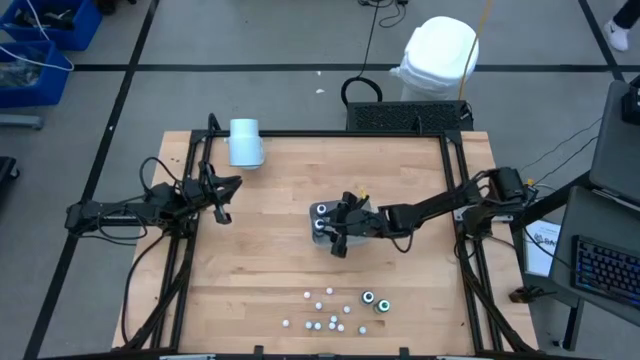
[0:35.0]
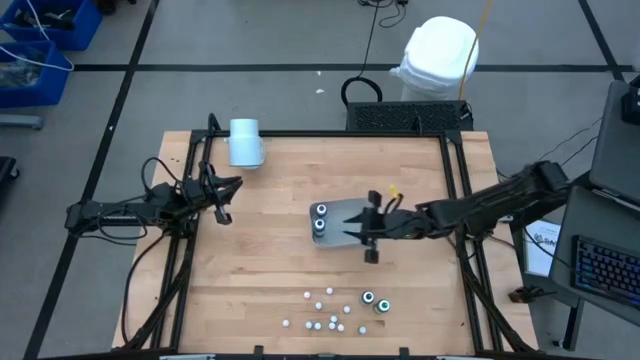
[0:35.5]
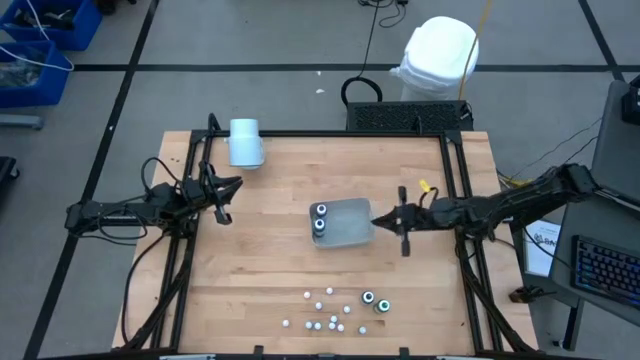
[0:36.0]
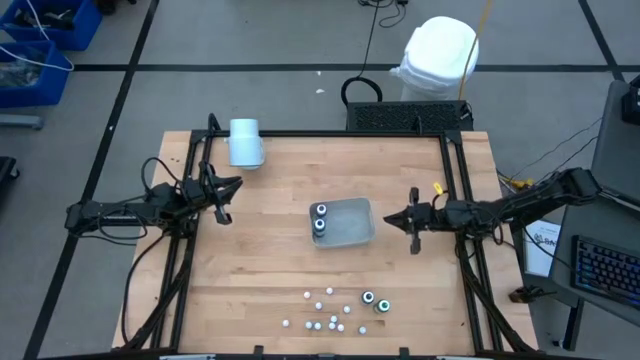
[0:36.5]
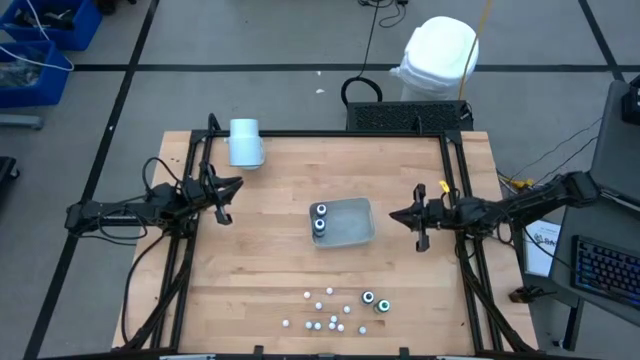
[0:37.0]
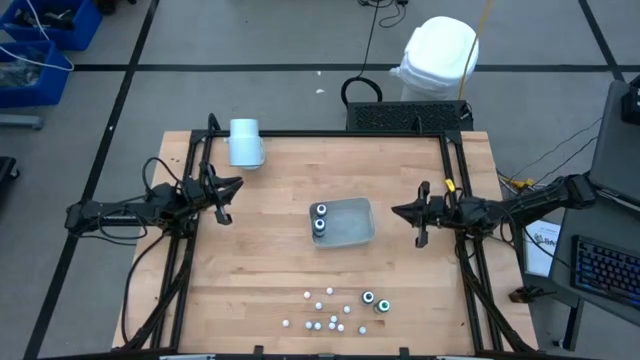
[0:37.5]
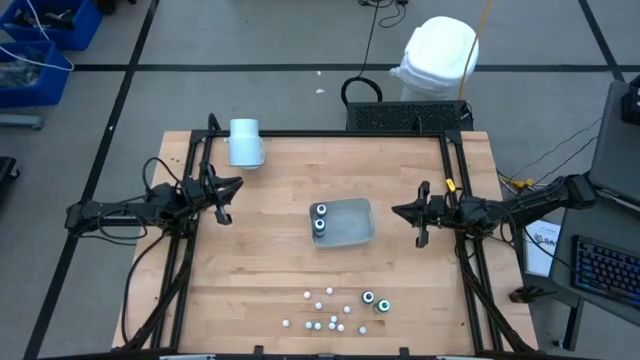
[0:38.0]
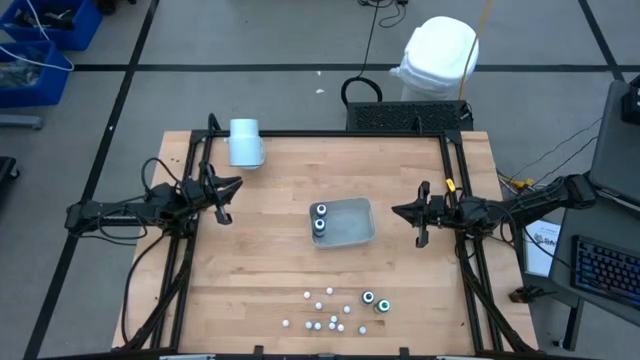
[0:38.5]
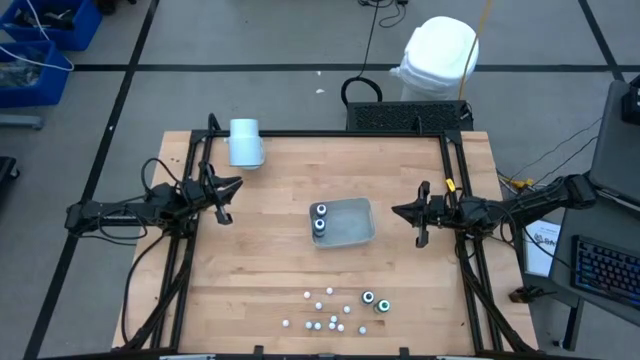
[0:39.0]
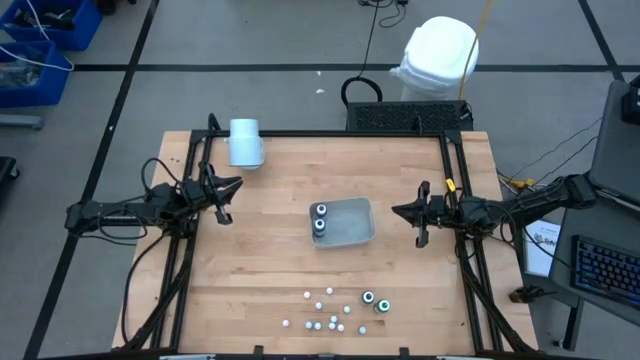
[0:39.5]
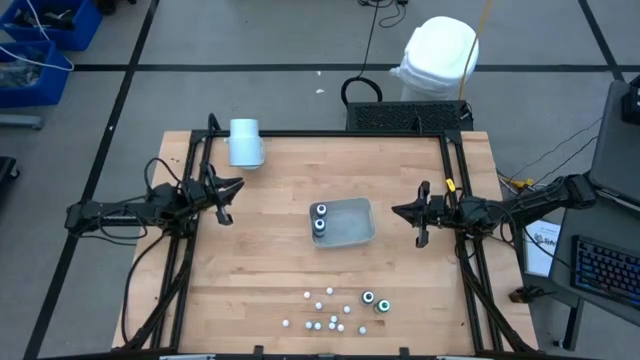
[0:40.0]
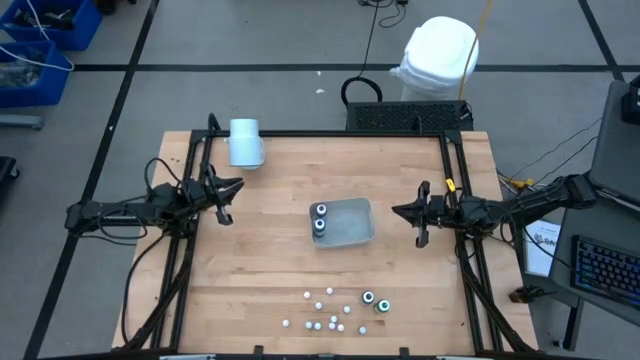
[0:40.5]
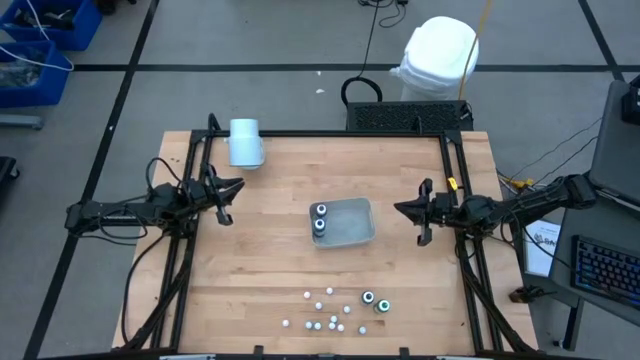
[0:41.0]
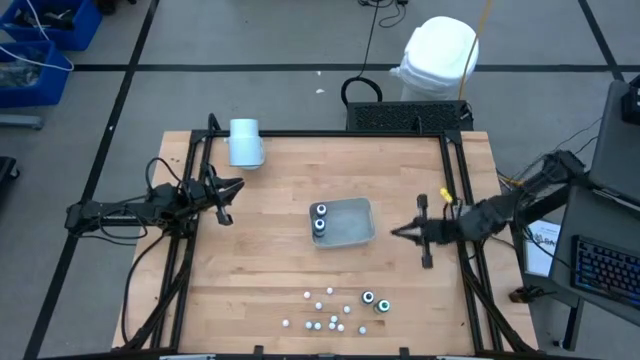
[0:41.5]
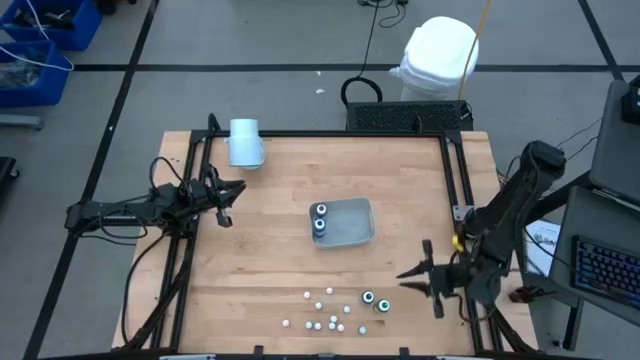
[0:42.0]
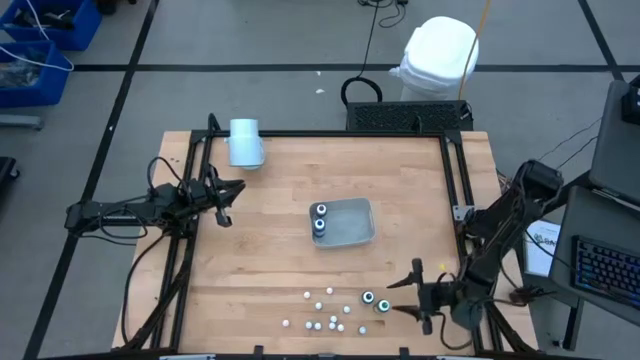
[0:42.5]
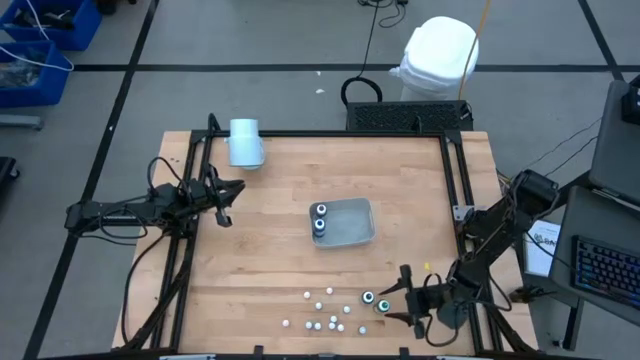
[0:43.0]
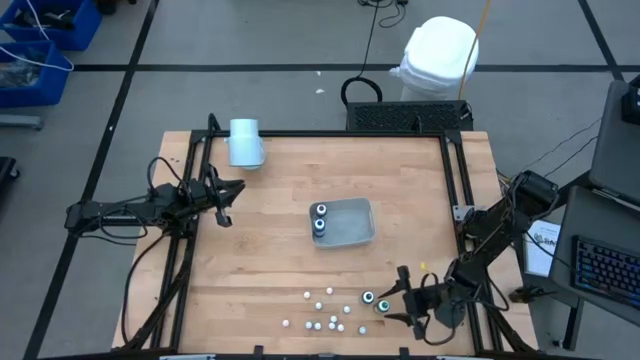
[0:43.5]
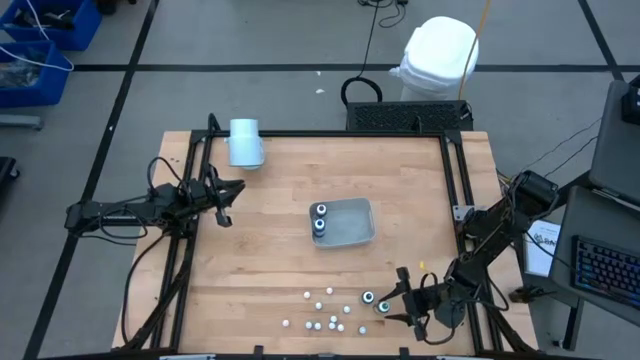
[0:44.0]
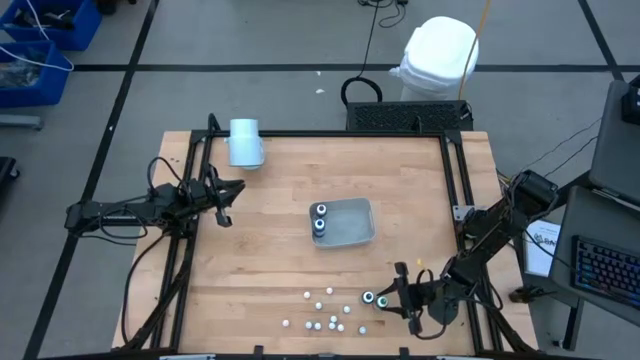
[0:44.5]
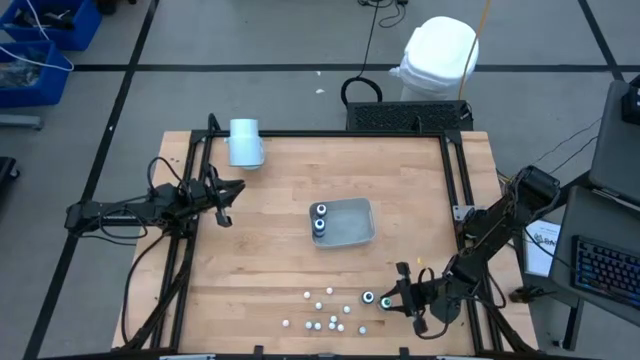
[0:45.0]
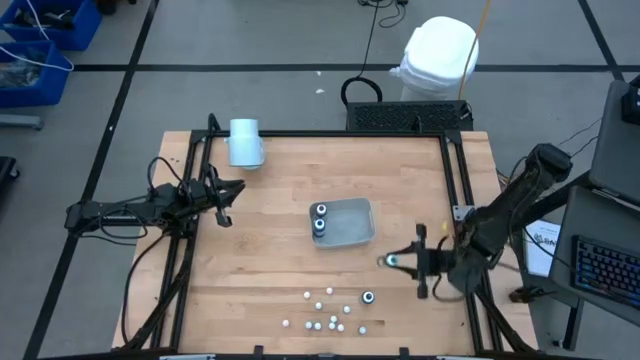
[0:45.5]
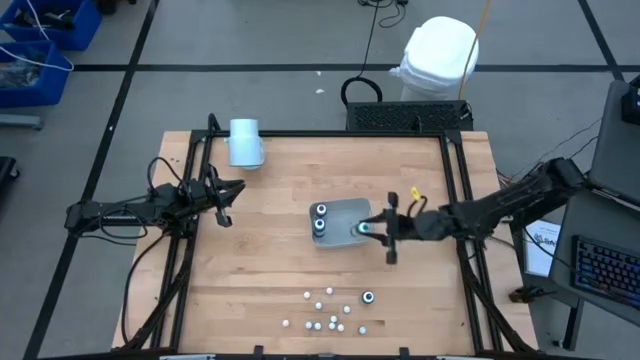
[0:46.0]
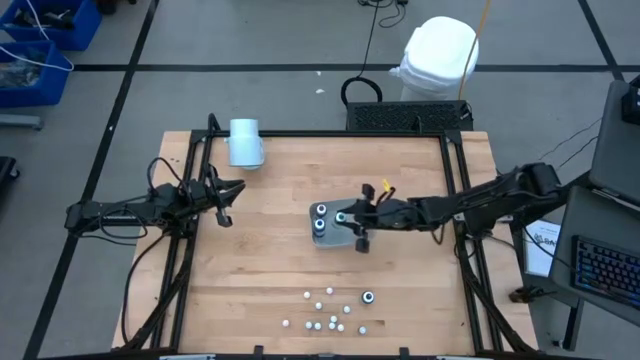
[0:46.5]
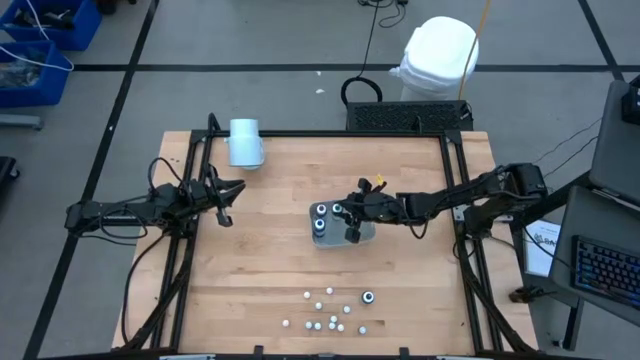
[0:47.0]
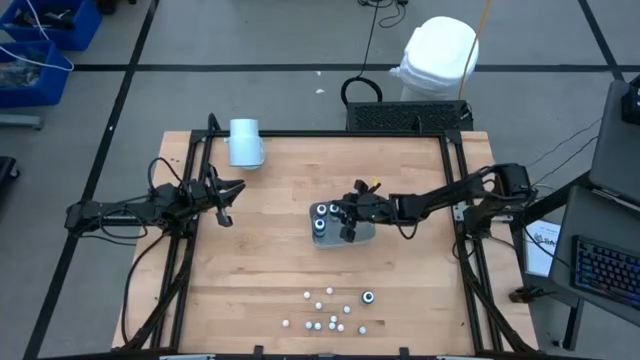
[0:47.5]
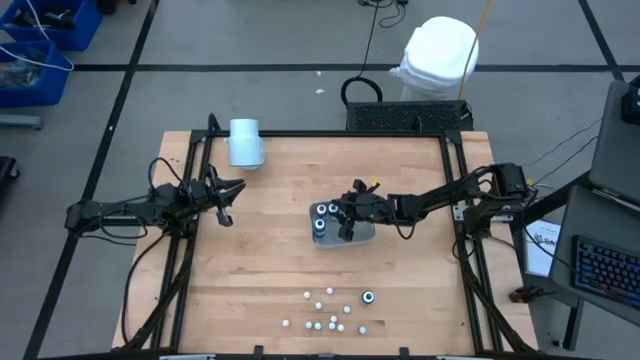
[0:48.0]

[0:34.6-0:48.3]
Task: Pick & Place food coloring
Put the large green food coloring bottle into the gray bin

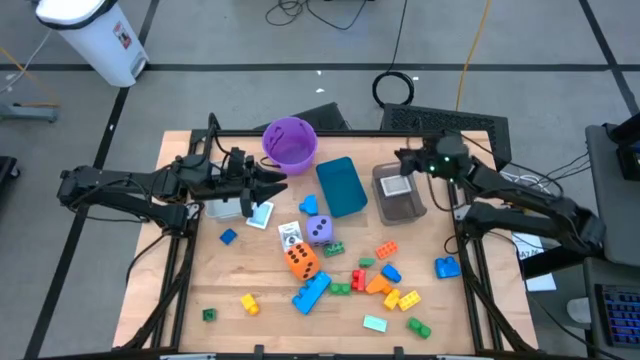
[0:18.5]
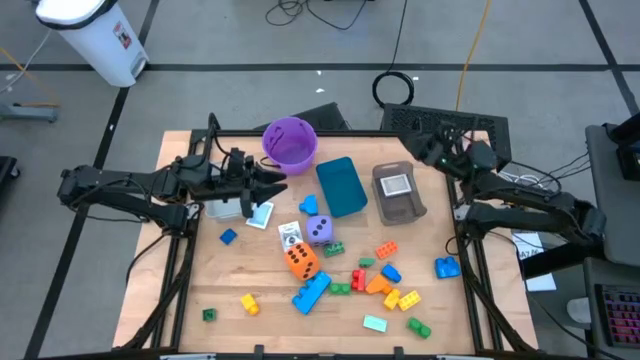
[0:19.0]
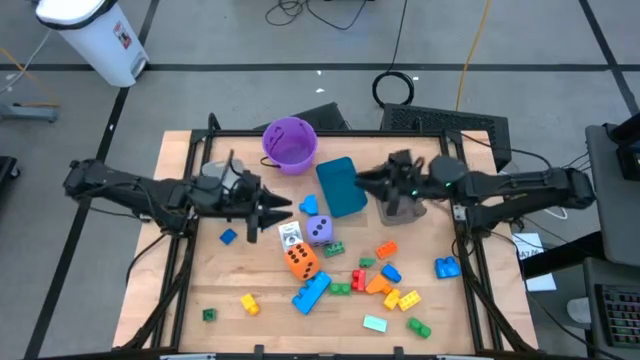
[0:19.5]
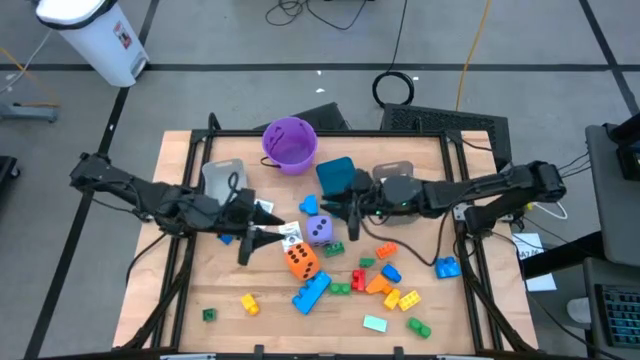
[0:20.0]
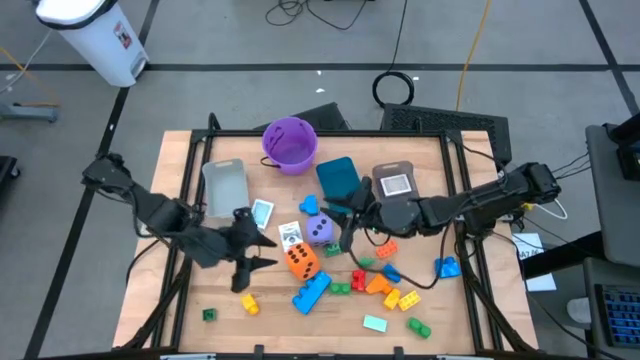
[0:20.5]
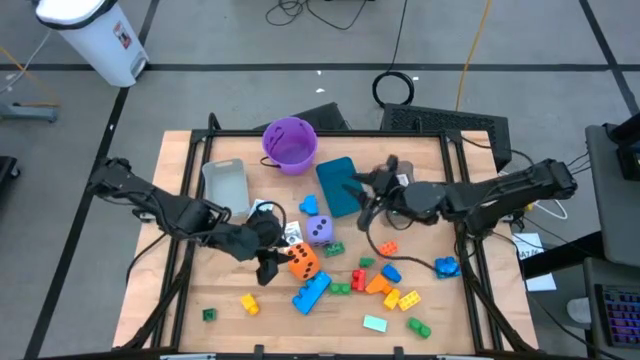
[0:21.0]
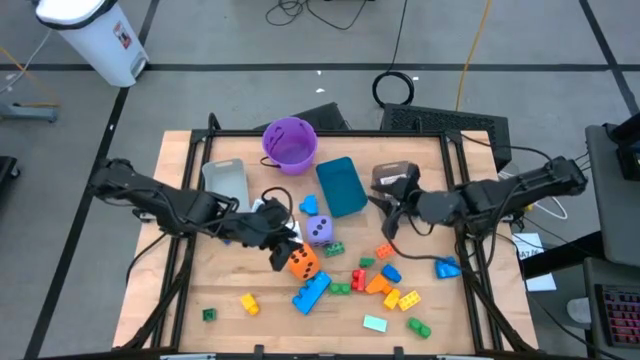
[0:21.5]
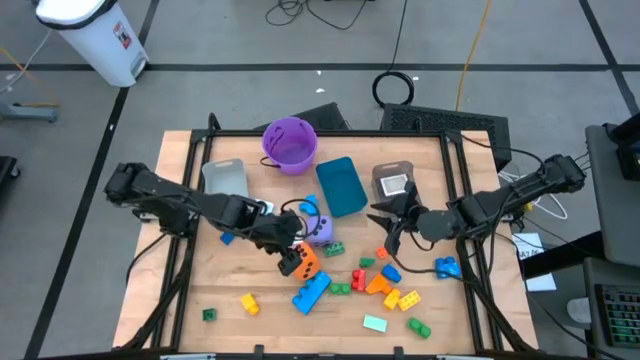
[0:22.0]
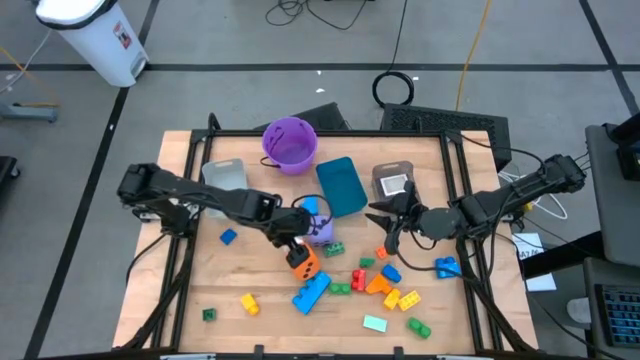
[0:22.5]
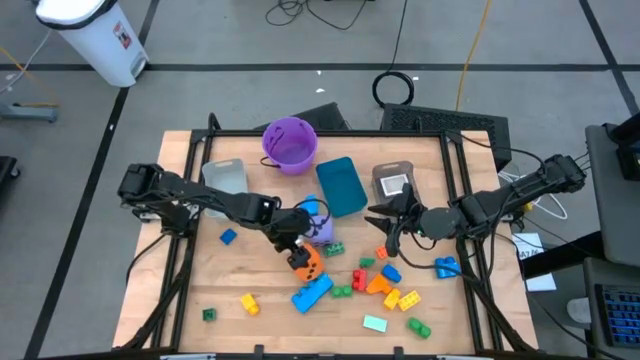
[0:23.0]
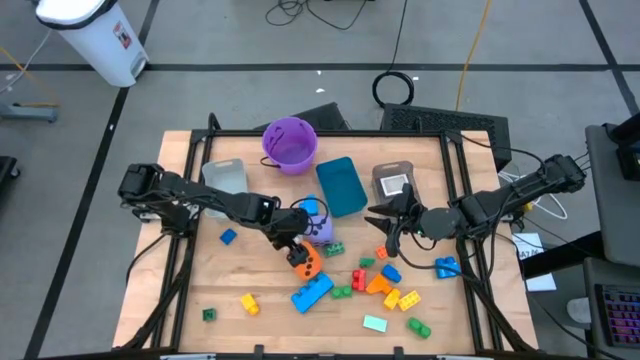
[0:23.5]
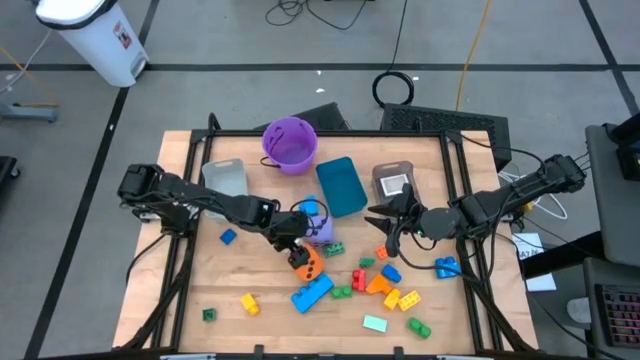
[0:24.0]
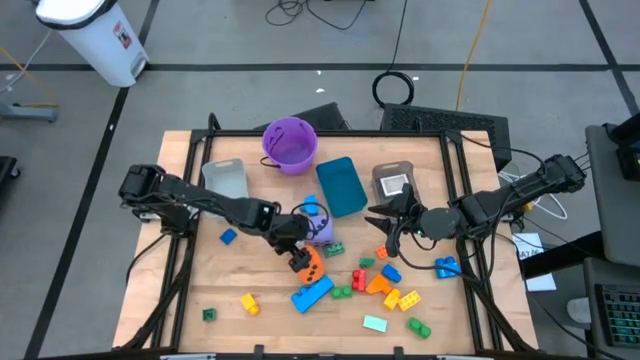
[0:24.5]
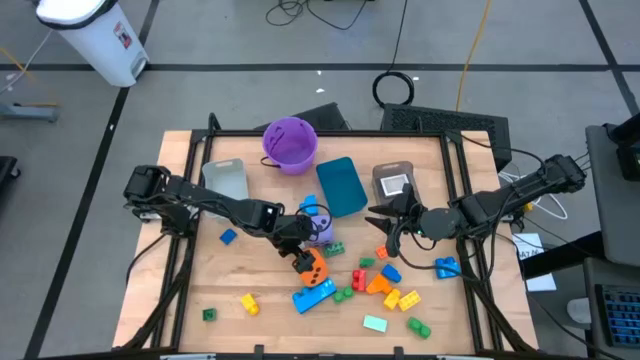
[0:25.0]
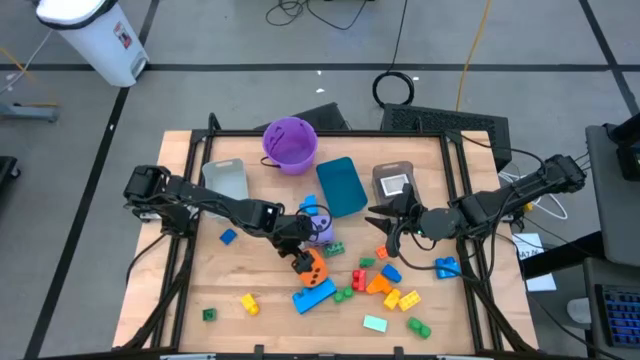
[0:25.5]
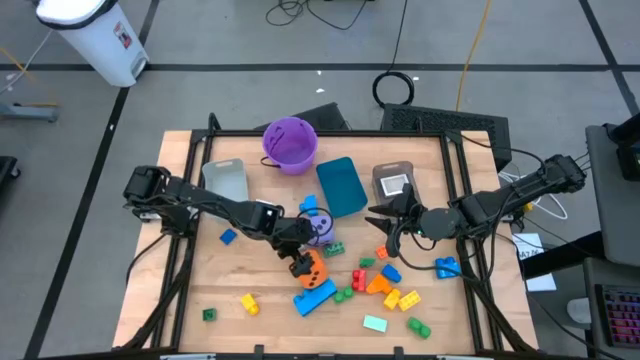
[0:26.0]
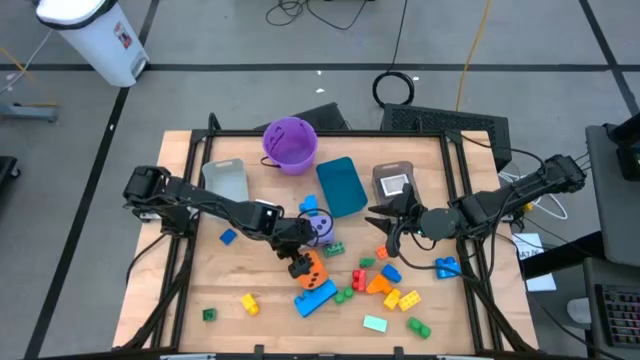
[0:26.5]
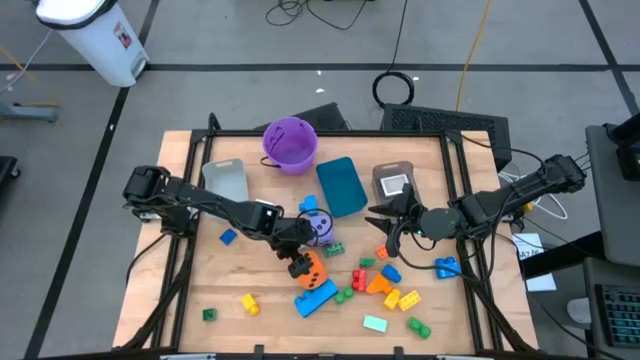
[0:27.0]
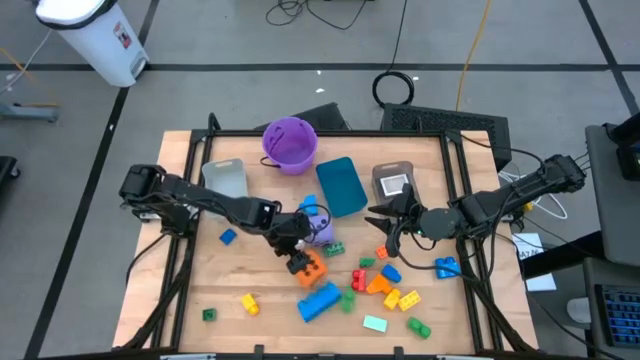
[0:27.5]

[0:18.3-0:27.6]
Task: Pick & Place Toys
Put the orange die into the gray bin
